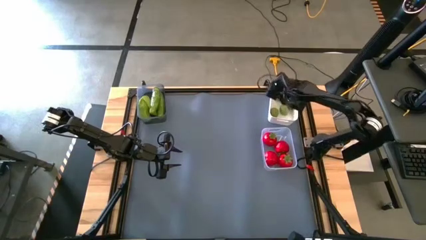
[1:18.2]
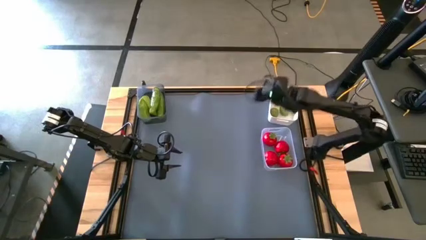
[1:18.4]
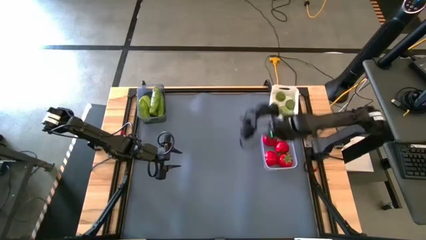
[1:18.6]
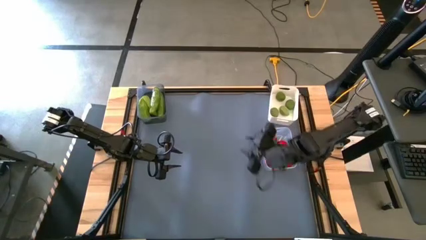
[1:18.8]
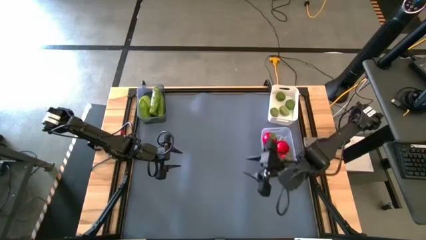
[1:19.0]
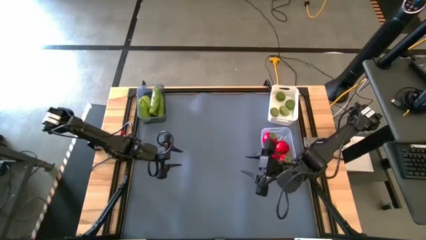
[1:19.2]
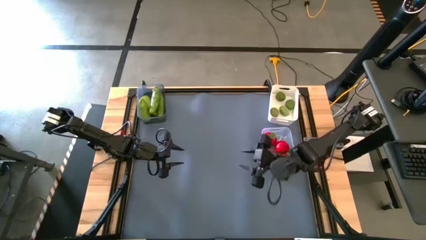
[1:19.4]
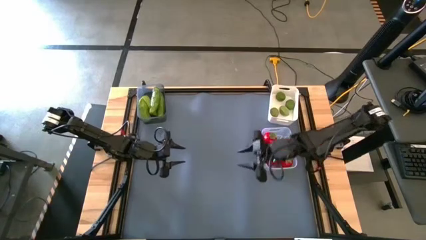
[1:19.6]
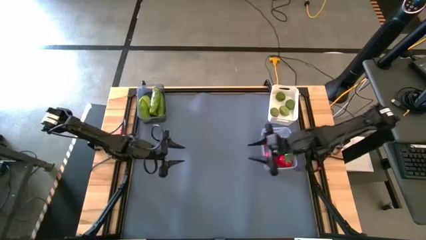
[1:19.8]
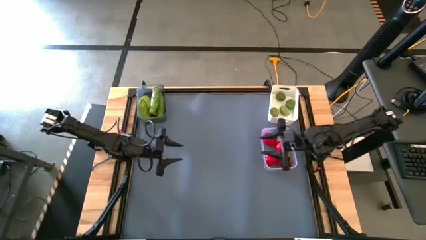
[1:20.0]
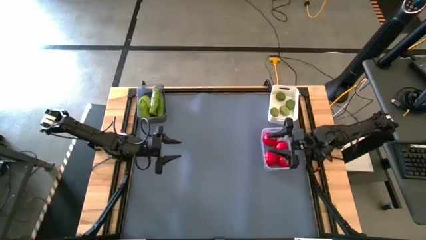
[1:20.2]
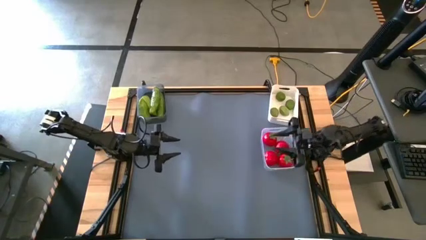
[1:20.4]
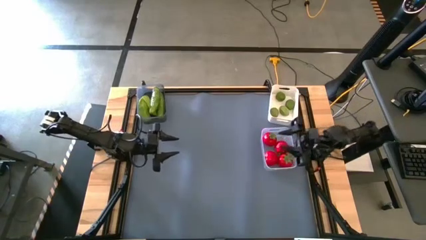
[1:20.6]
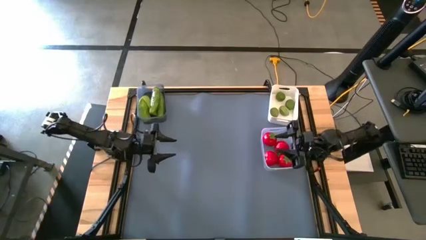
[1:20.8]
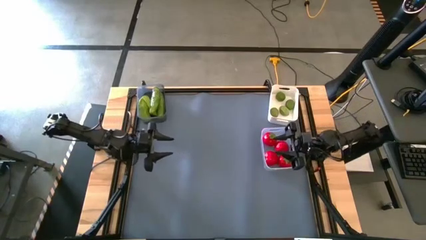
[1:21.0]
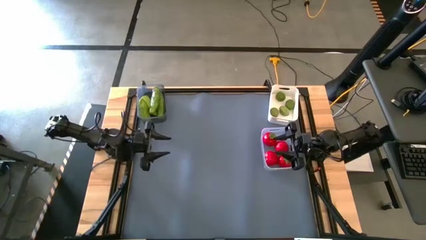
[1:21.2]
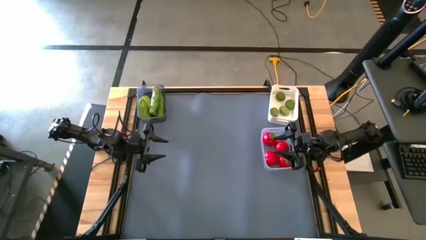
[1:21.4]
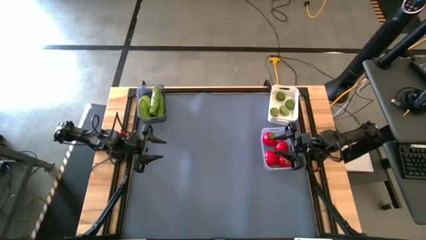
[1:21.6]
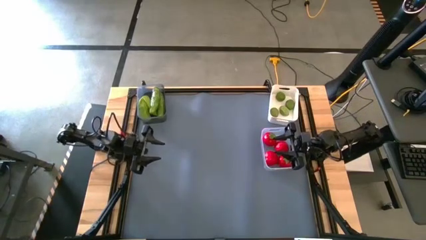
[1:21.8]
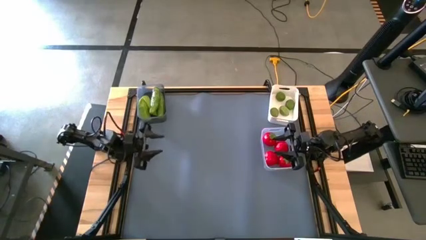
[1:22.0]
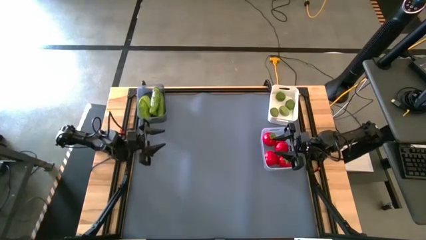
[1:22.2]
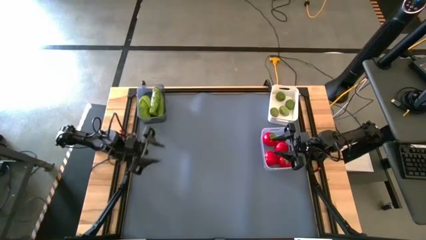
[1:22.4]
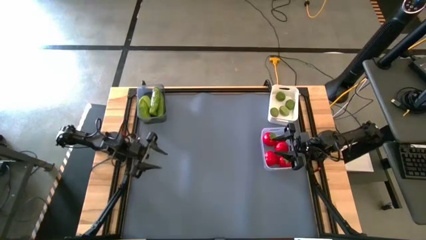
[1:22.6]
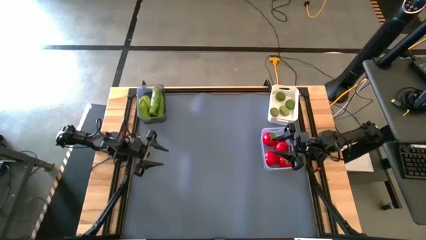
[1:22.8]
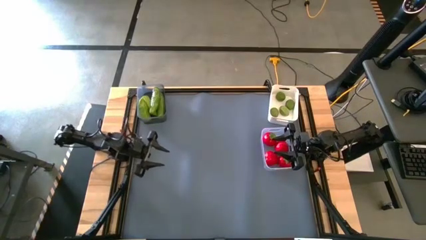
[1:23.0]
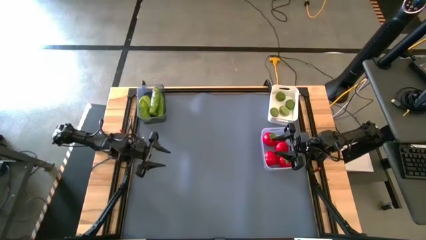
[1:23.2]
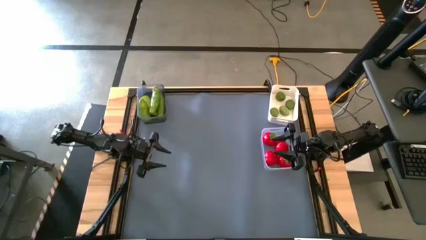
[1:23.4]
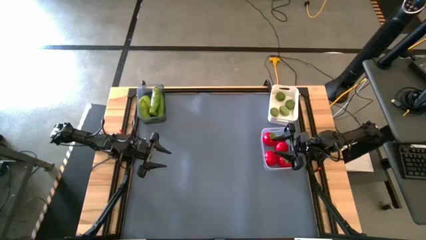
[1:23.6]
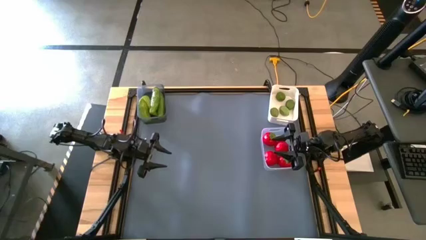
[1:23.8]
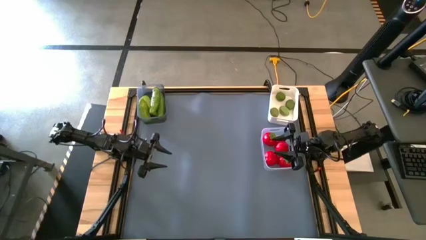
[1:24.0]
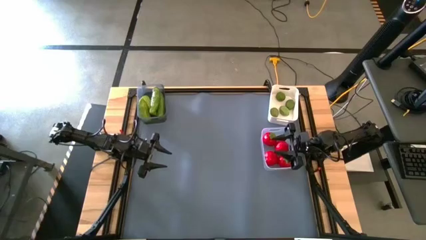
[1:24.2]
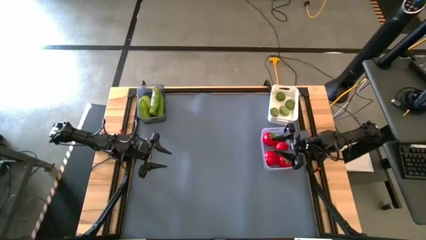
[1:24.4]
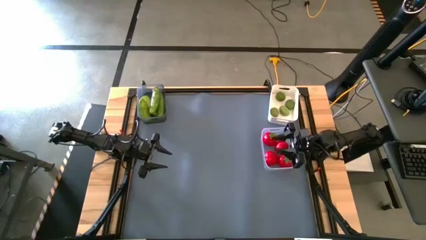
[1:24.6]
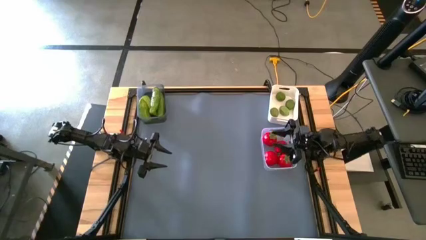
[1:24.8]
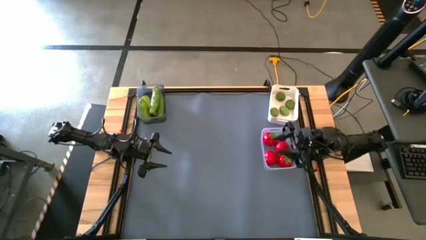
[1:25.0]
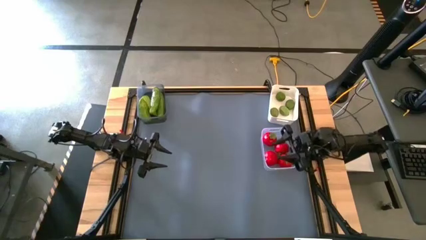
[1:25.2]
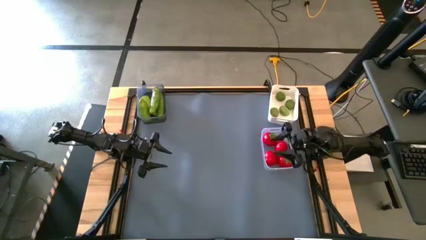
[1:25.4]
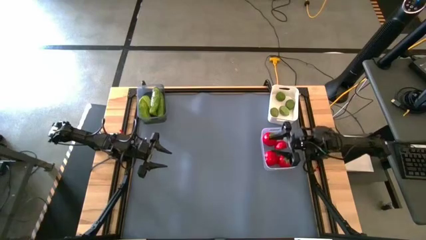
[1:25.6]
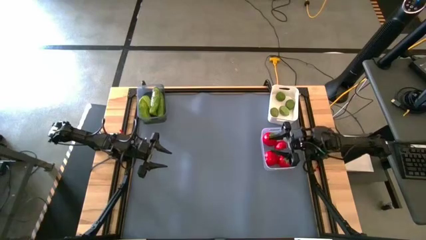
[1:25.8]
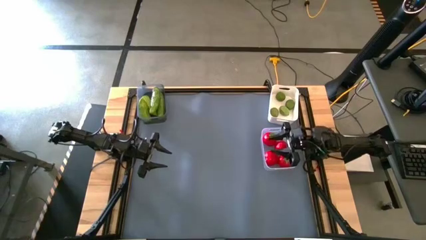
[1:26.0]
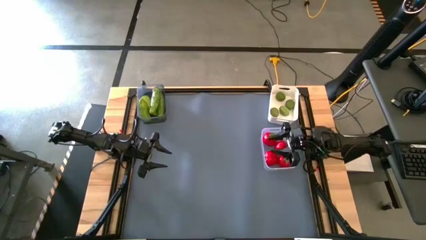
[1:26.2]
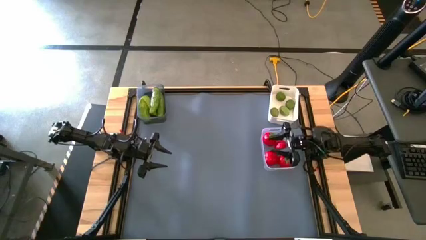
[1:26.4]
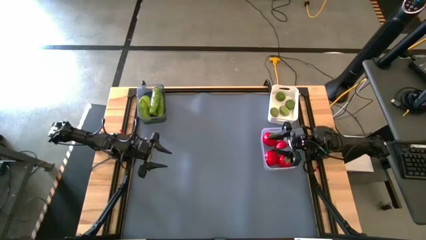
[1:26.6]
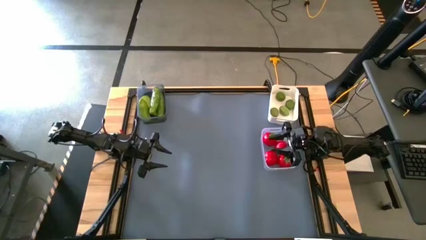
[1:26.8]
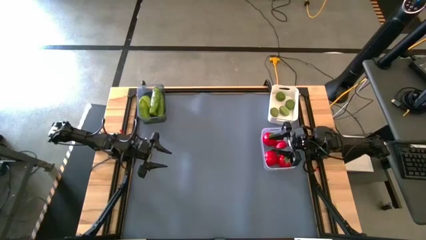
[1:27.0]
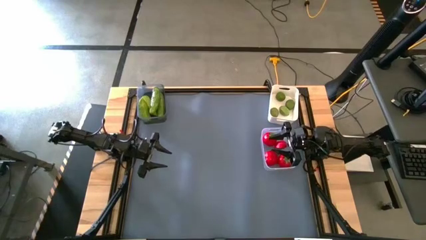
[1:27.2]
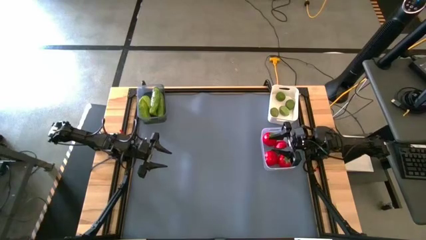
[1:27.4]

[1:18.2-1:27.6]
Task: Sort produce into baskets
Return to Home Position

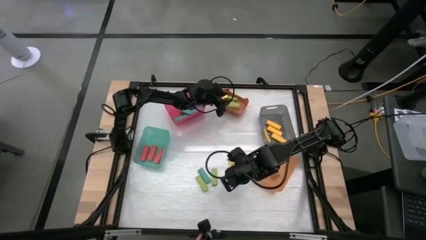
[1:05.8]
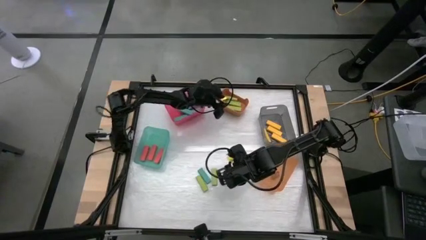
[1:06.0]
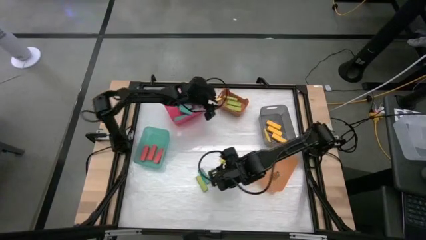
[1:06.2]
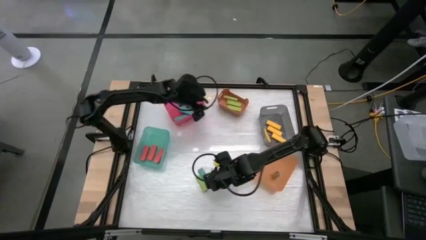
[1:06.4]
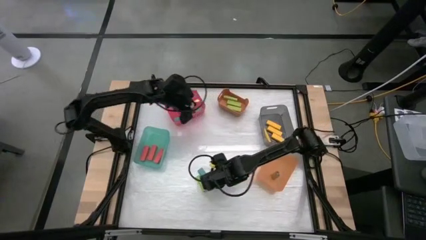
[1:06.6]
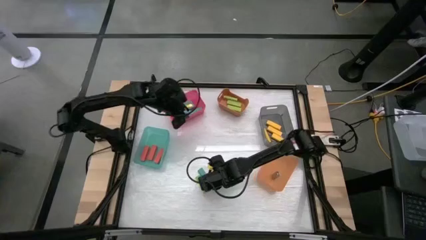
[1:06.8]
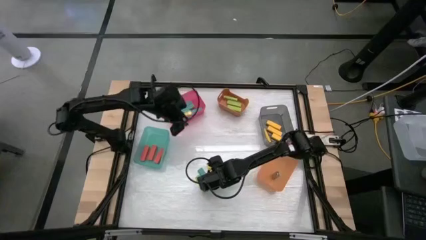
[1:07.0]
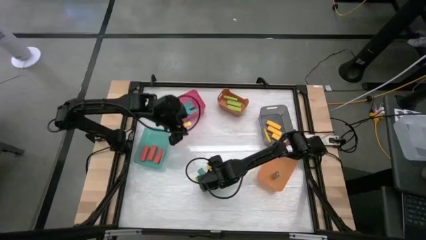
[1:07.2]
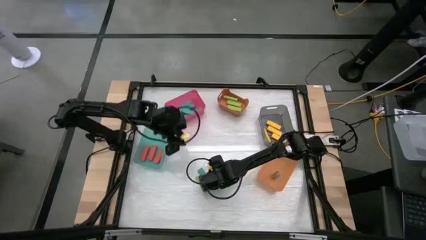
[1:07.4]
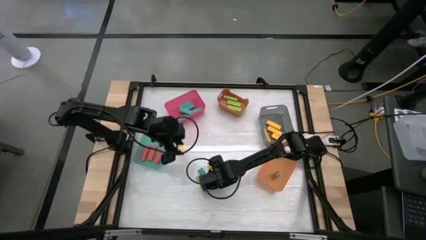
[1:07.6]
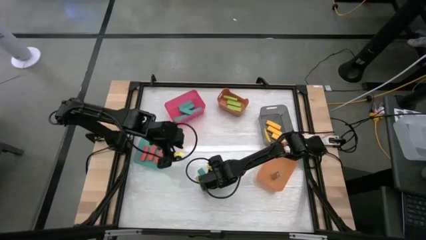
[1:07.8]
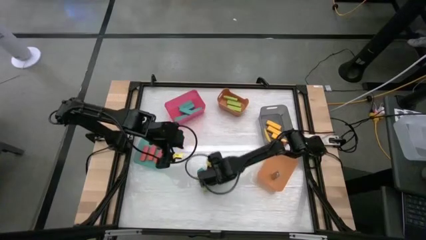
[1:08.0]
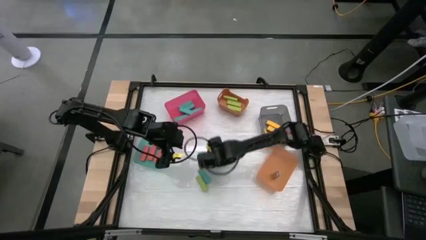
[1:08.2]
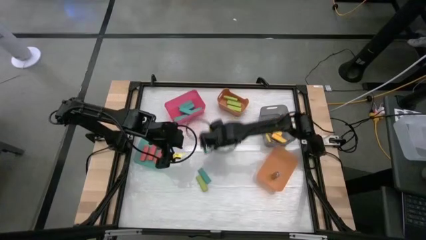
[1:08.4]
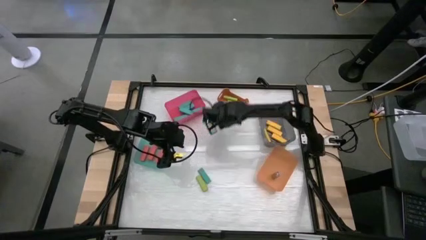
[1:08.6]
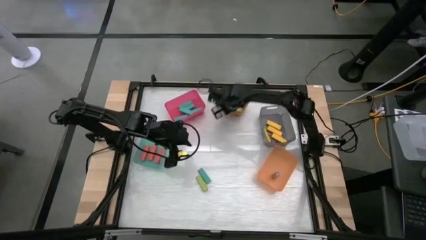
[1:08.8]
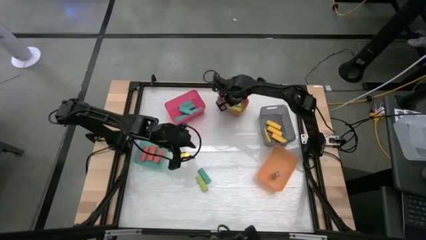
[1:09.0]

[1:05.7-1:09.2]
Task: Sort blocks
Put the green block into the orange bin

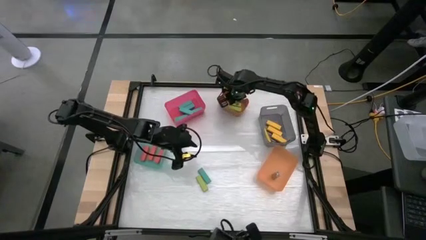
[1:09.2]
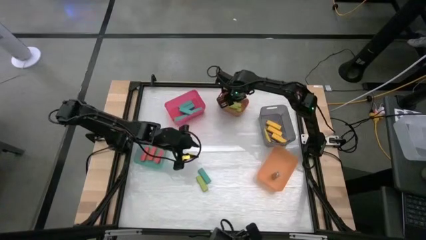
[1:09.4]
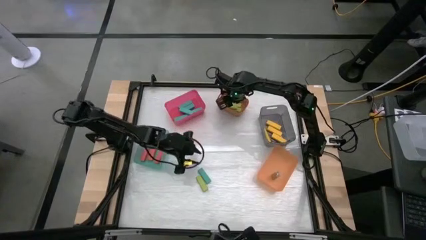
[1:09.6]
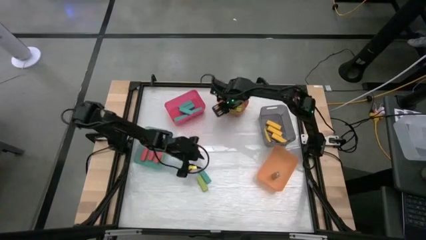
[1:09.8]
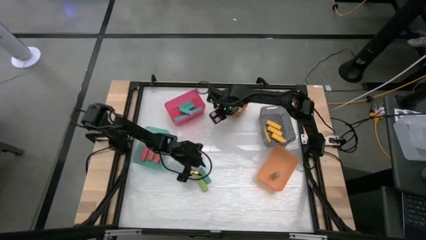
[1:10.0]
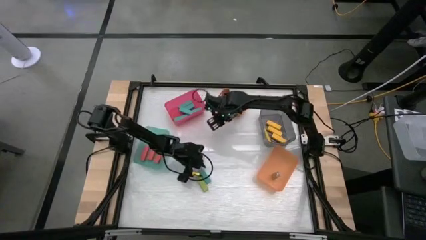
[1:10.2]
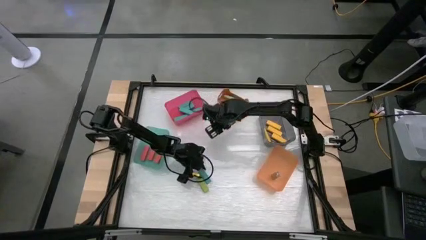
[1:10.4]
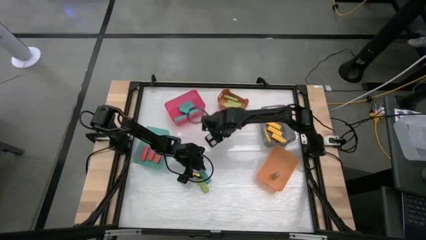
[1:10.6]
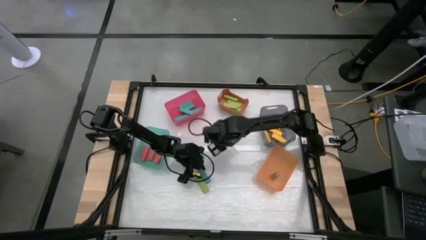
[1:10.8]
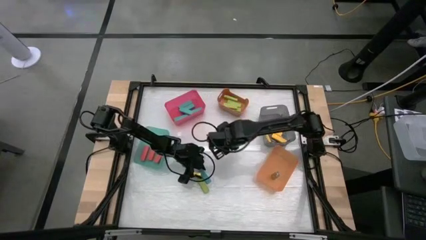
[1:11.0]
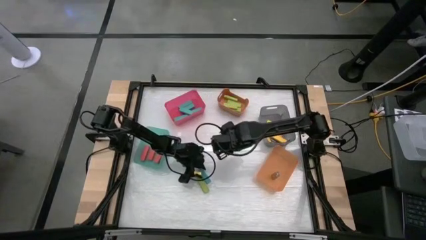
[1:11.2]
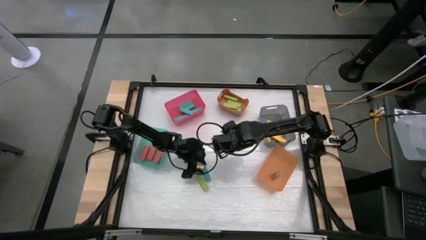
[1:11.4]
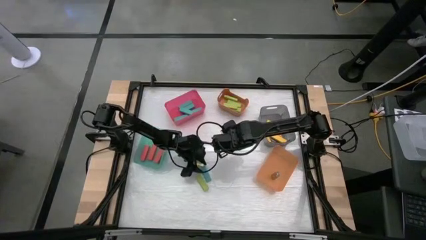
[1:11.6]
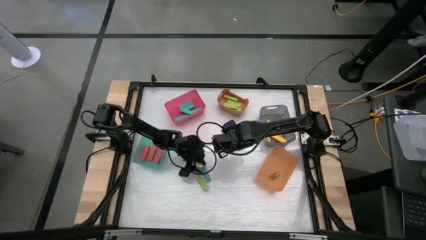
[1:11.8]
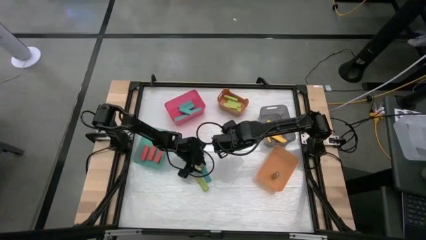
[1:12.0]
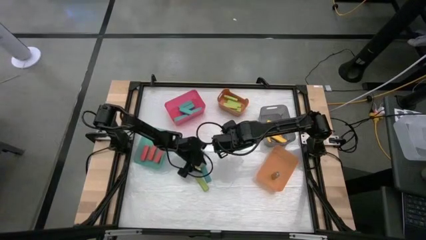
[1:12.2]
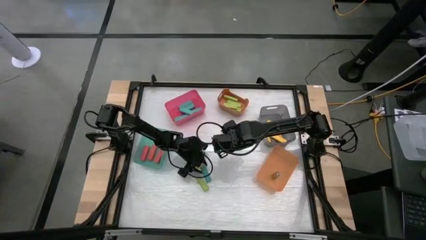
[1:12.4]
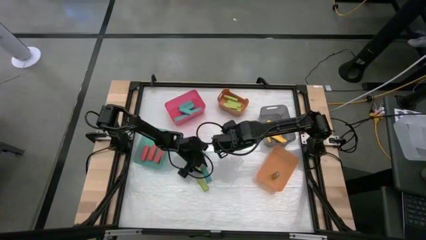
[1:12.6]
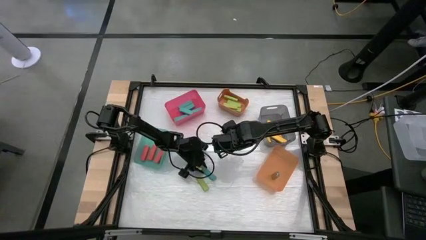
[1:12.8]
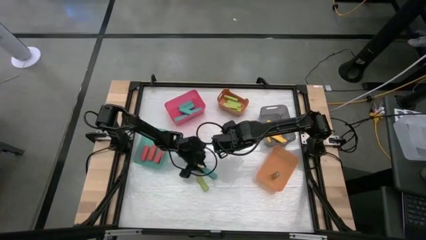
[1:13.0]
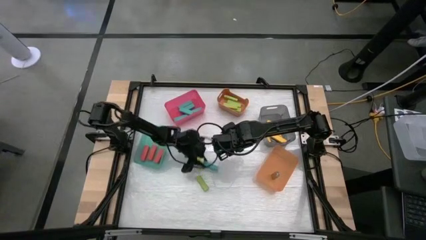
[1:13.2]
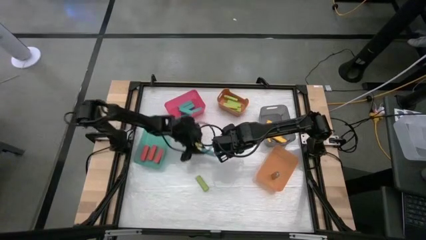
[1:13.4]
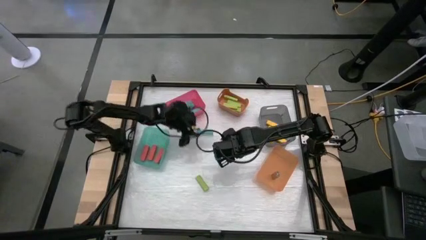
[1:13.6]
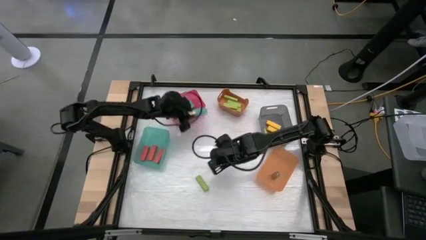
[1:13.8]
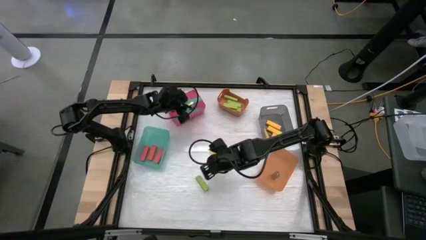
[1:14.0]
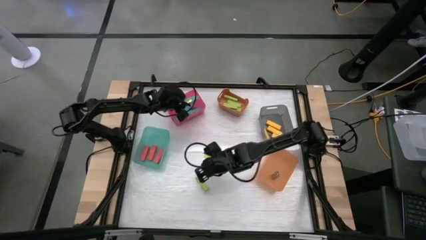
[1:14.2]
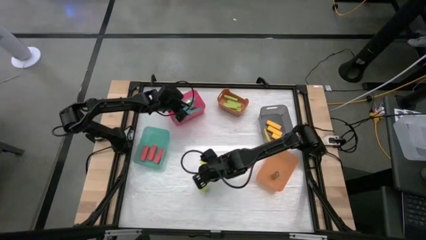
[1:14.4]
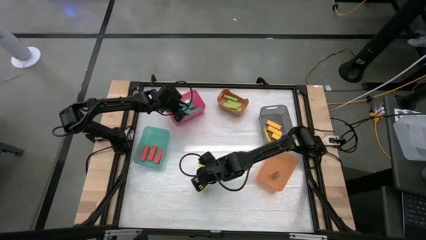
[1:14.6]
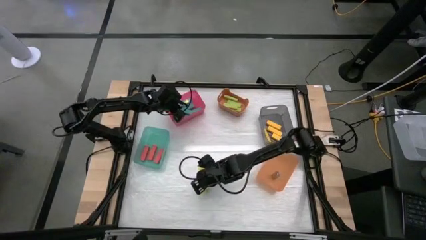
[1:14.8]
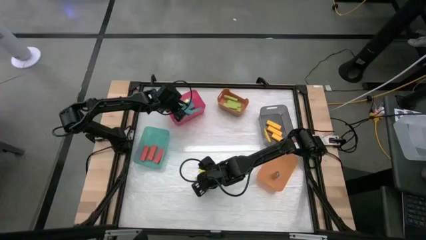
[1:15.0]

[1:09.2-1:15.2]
Put the blue block into the pink bin
